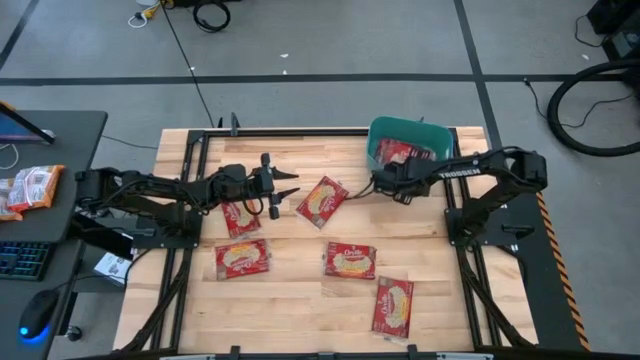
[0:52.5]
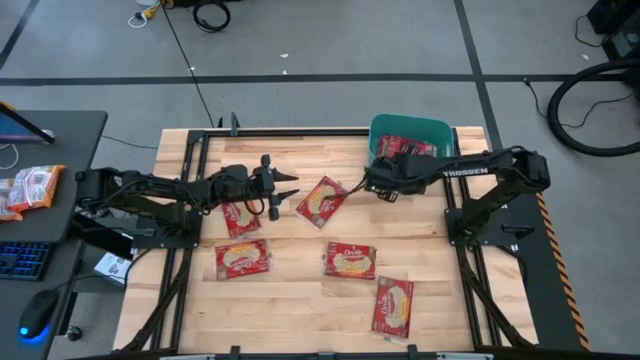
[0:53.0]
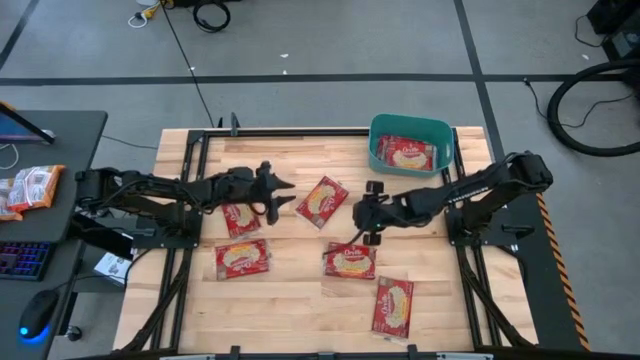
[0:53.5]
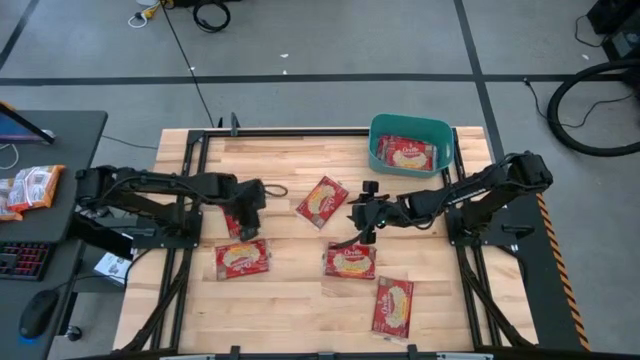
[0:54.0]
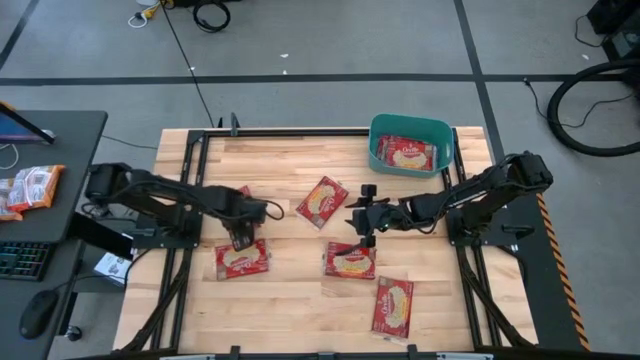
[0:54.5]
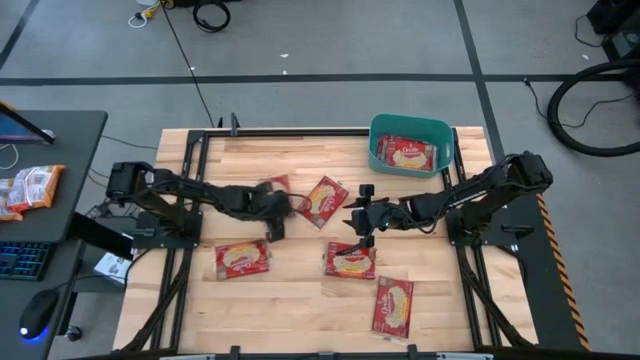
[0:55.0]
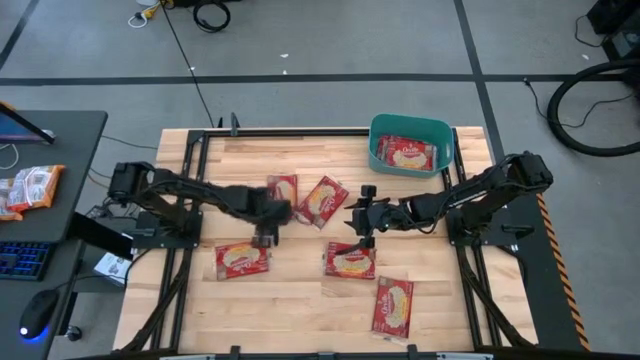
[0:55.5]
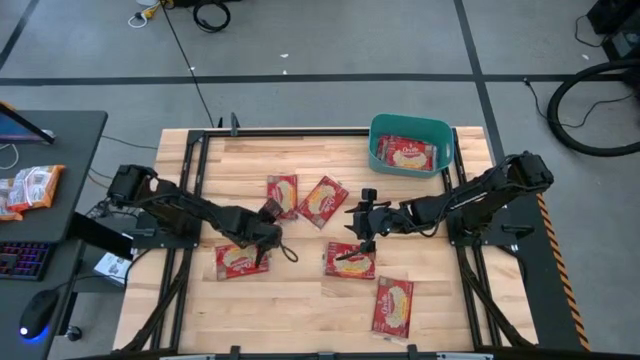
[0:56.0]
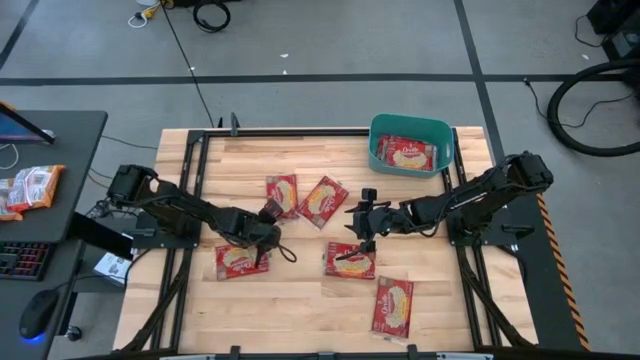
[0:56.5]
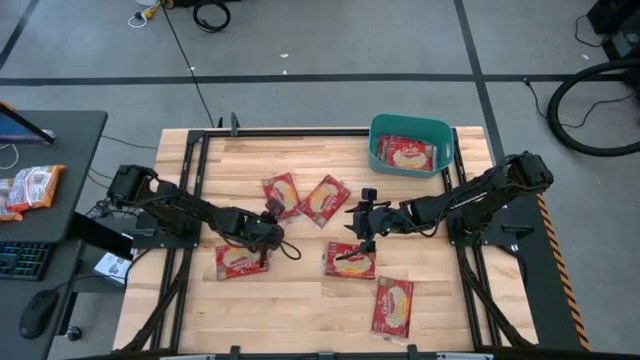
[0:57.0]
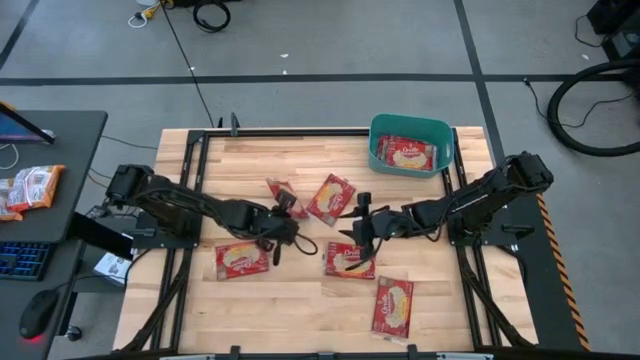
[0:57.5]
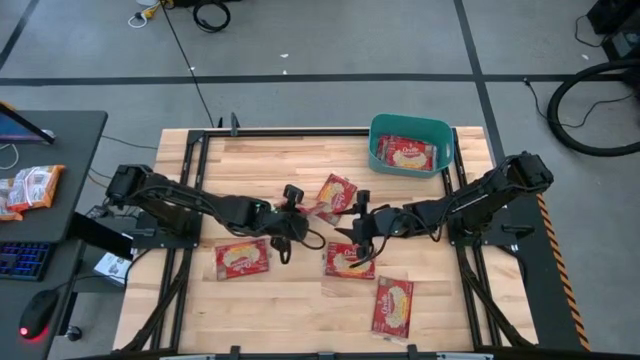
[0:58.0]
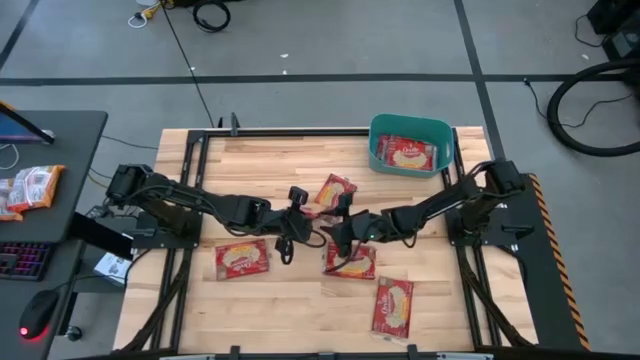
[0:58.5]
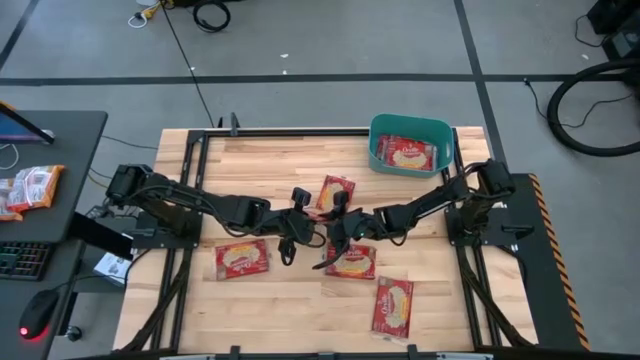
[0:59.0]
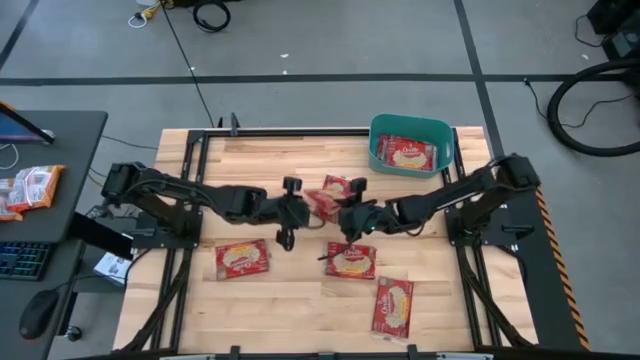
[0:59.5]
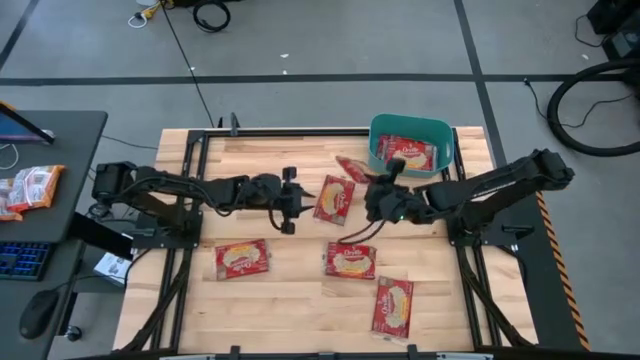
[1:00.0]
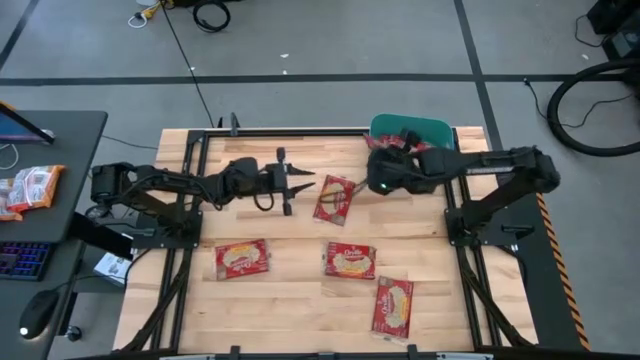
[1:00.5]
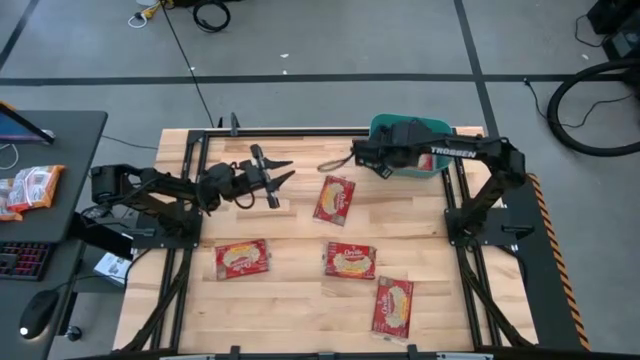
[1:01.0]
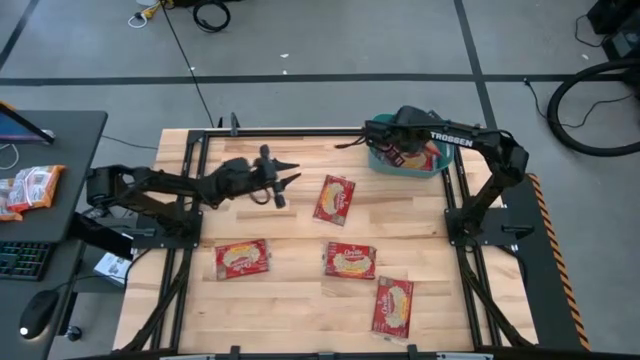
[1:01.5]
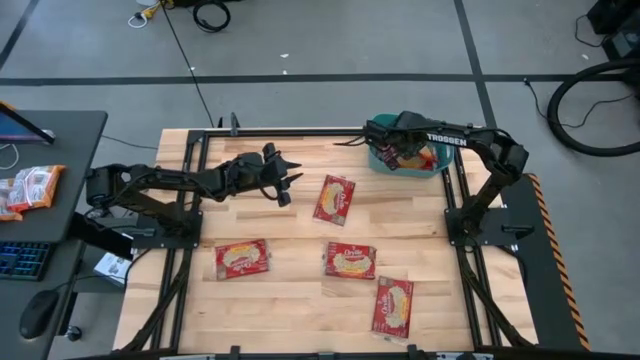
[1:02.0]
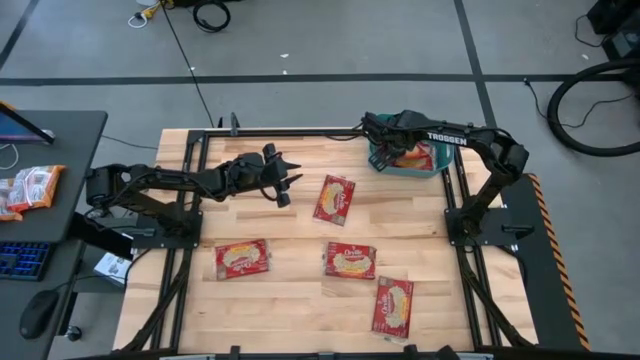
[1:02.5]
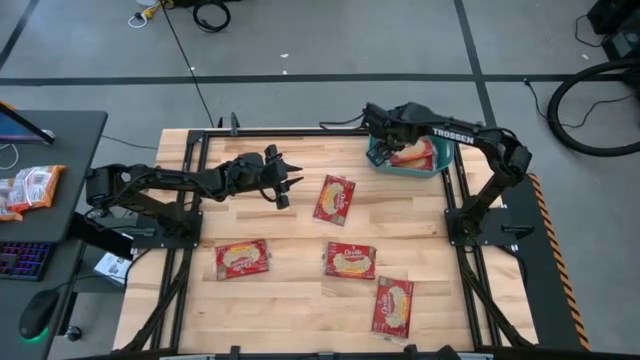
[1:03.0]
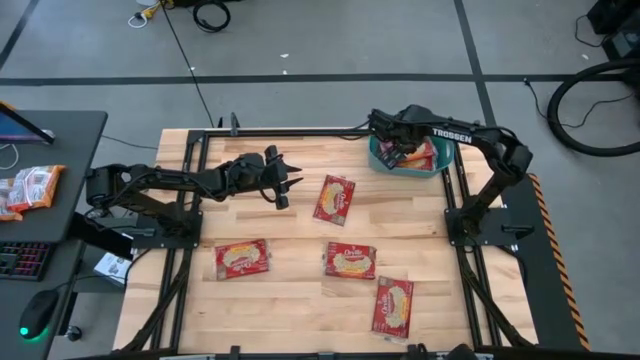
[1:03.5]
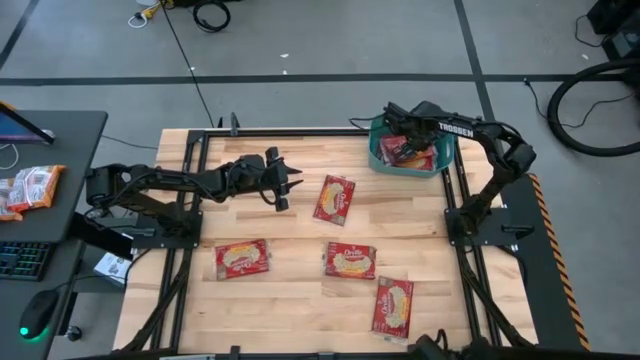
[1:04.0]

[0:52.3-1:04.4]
Task: Sort popcorn bags into baskets
Put the popcorn bag into the blue bin

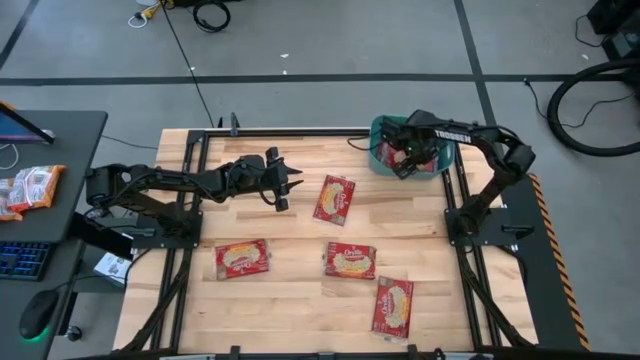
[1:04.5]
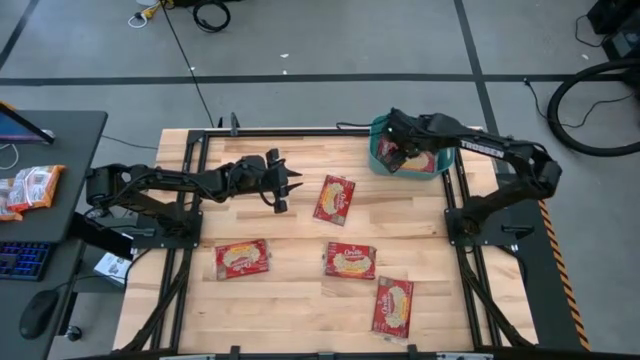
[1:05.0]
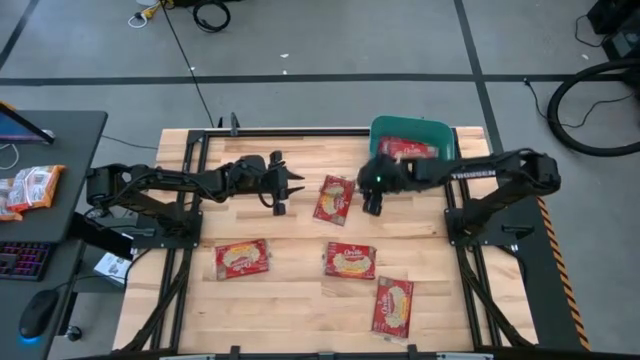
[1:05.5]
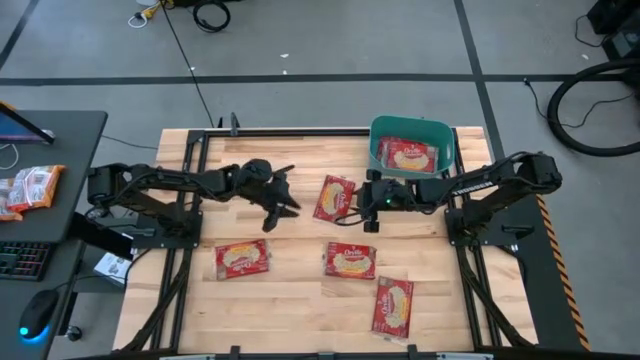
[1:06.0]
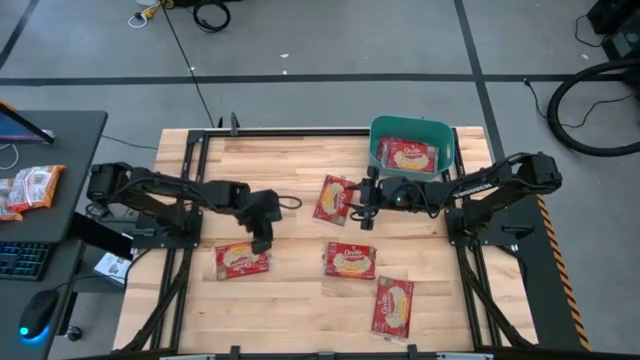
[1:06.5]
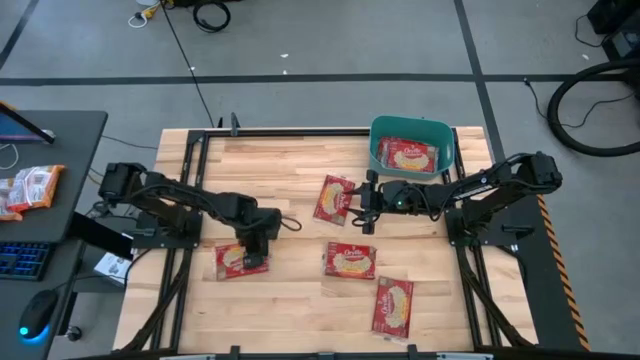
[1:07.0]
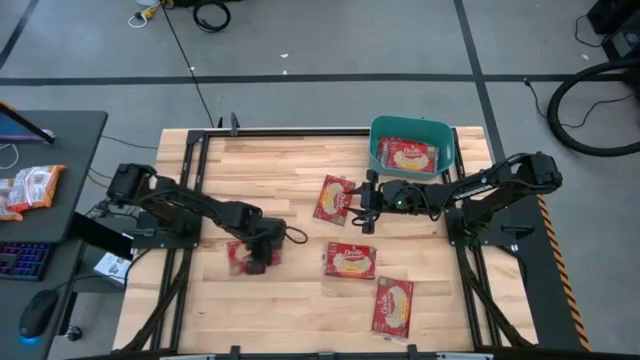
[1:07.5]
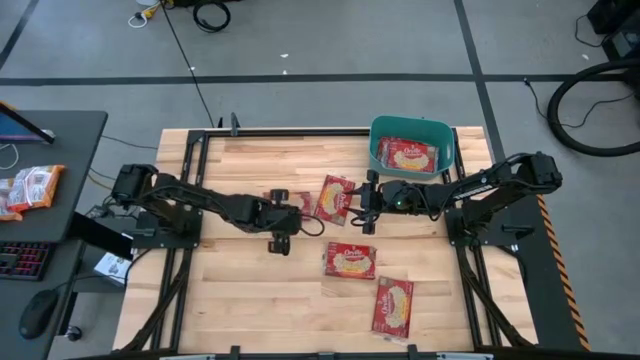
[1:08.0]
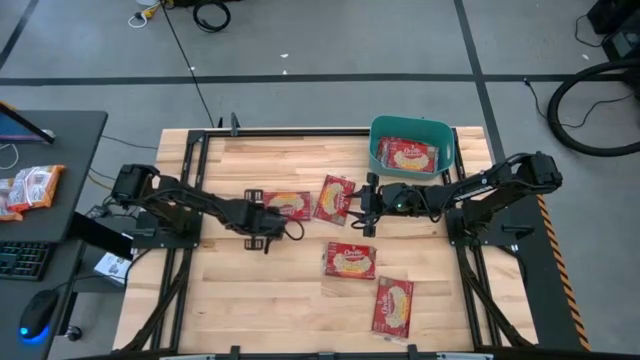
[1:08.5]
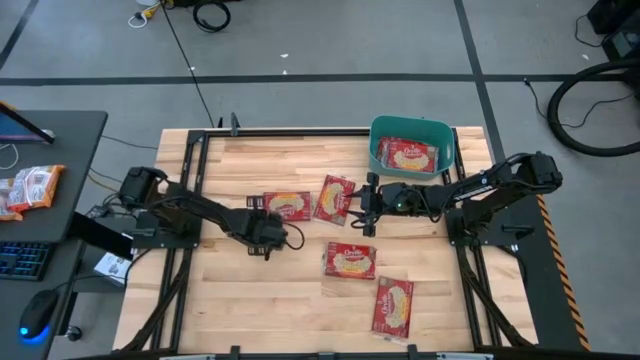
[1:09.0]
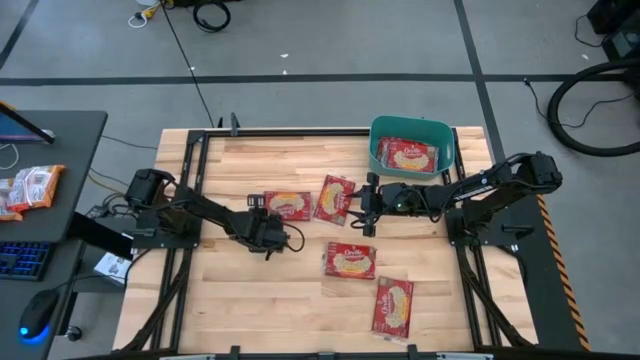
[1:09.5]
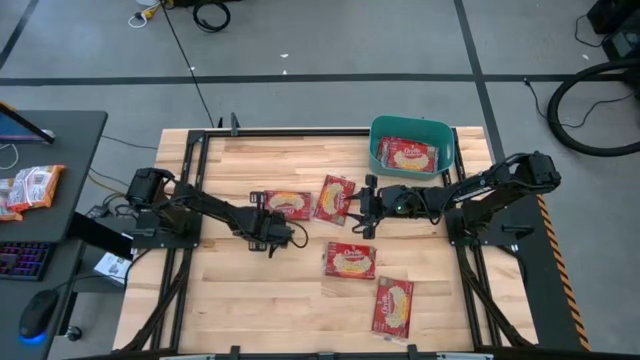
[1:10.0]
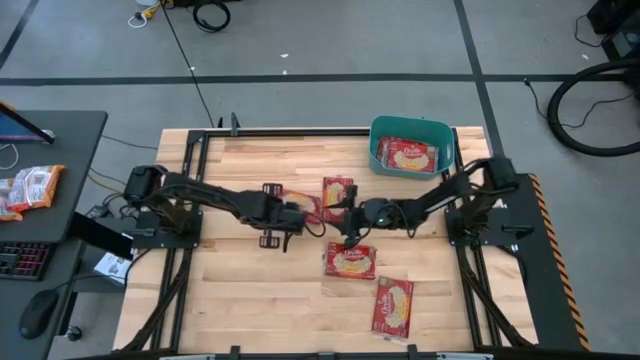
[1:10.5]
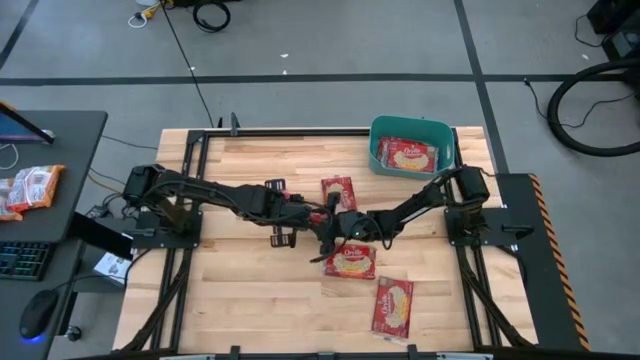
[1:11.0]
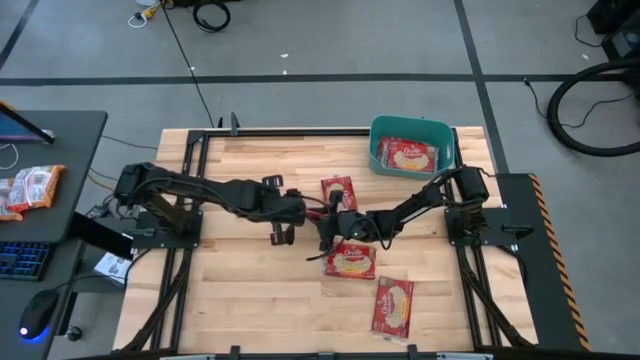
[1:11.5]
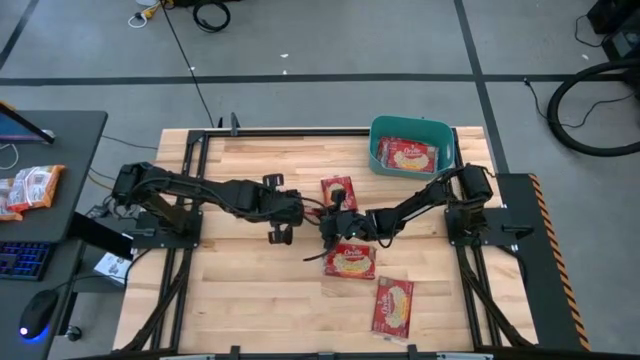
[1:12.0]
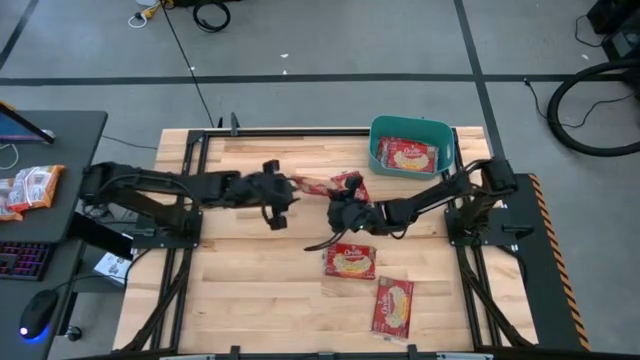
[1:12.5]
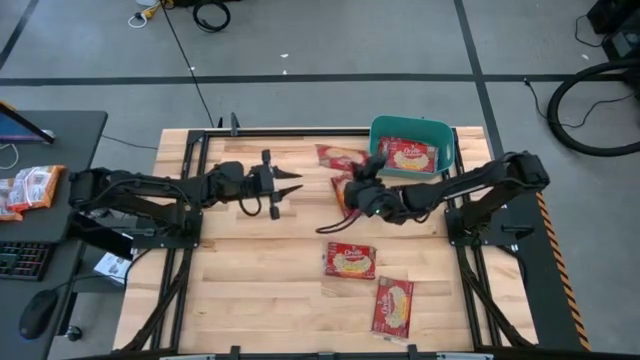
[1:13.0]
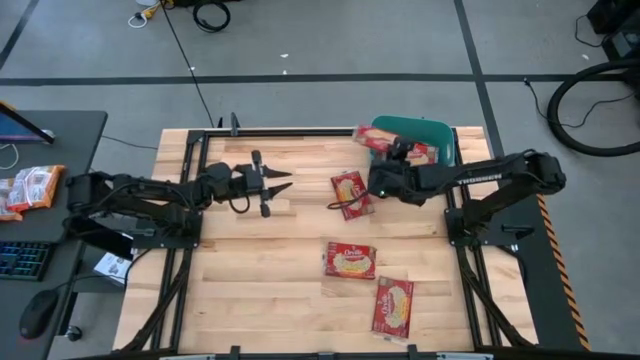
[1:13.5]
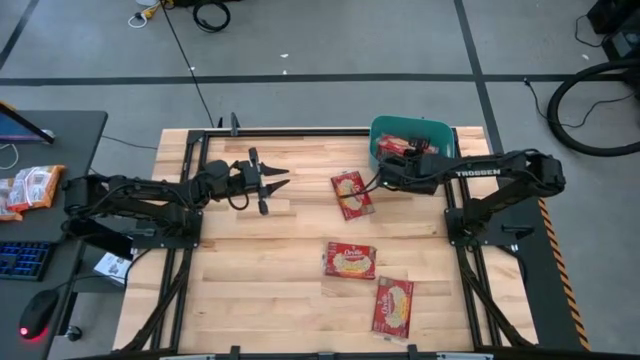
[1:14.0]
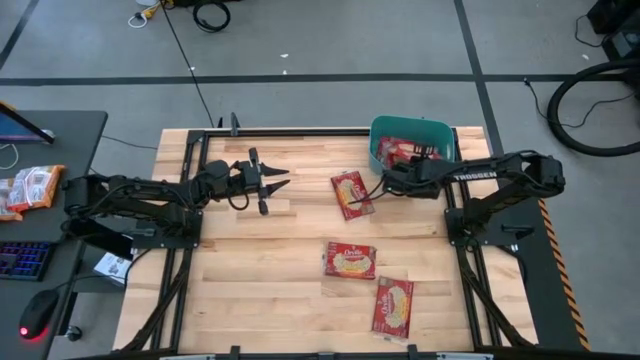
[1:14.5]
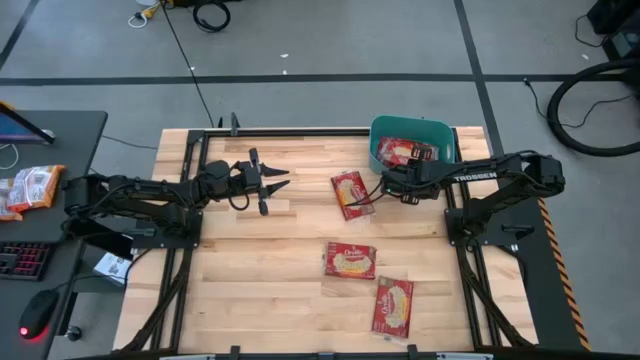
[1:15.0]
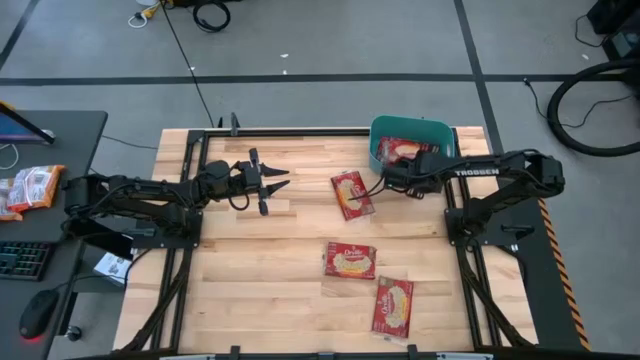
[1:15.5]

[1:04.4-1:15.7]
Put the popcorn bag into the blue bin
